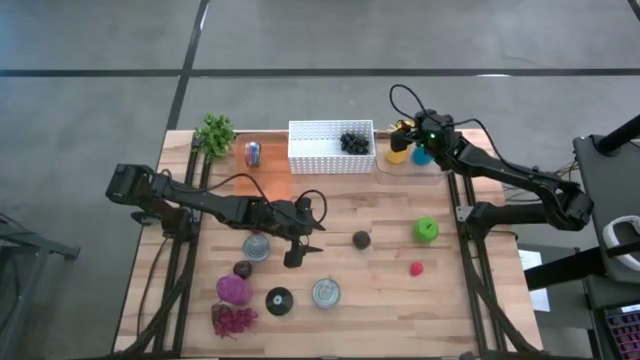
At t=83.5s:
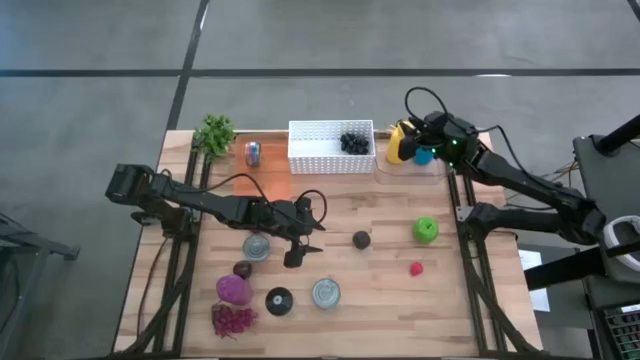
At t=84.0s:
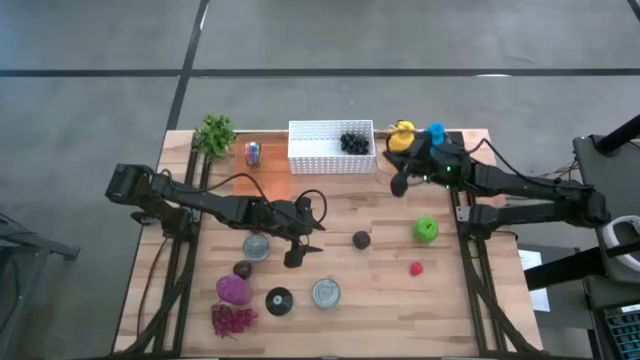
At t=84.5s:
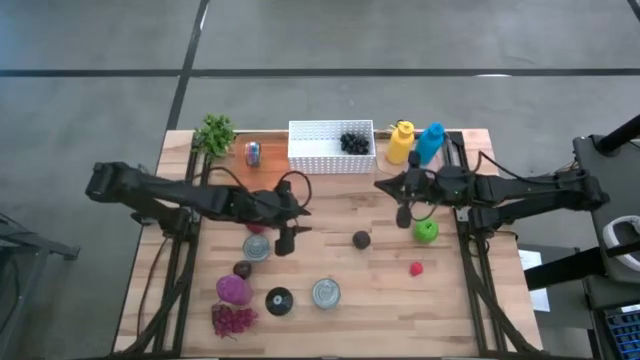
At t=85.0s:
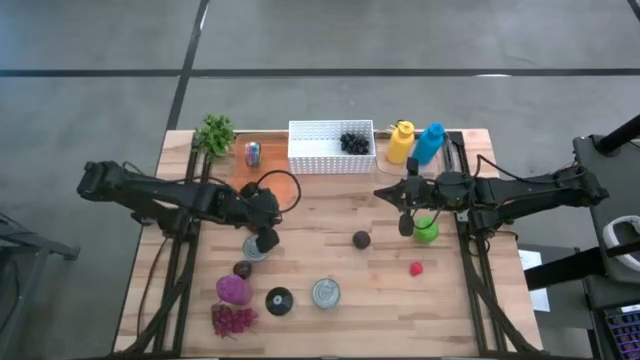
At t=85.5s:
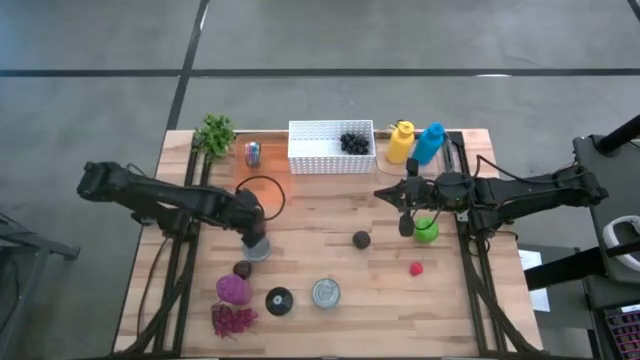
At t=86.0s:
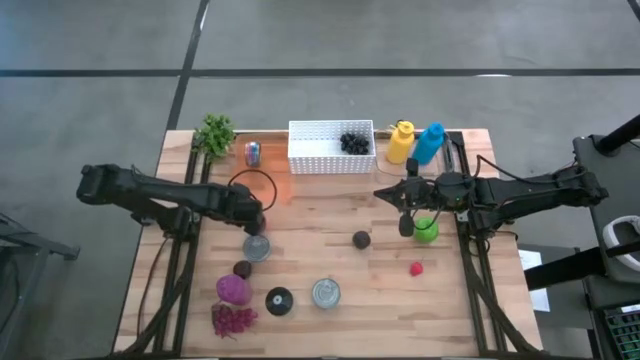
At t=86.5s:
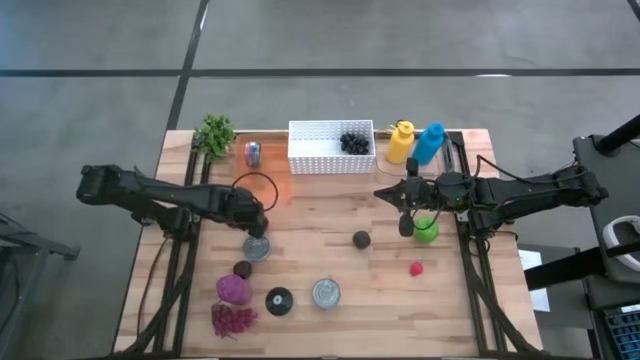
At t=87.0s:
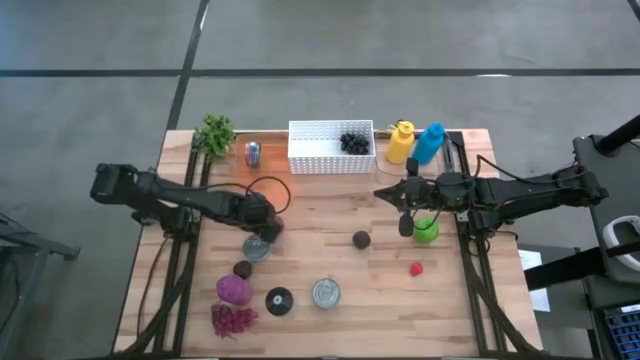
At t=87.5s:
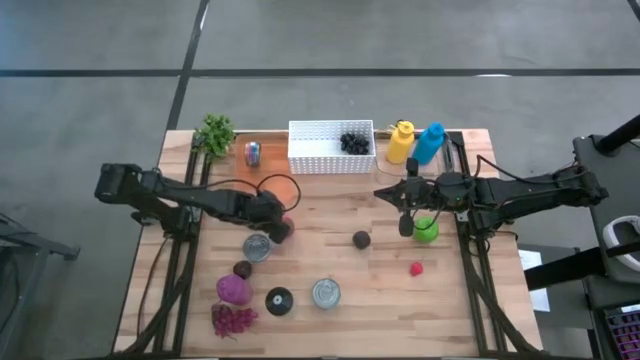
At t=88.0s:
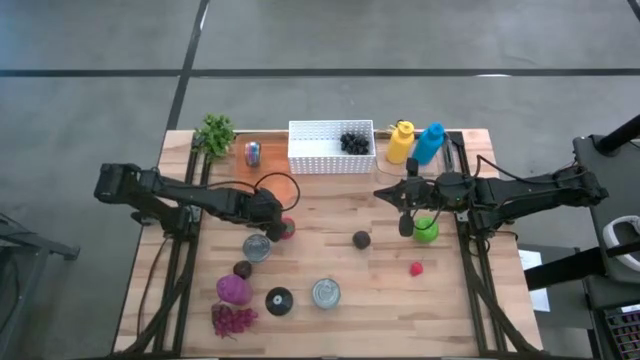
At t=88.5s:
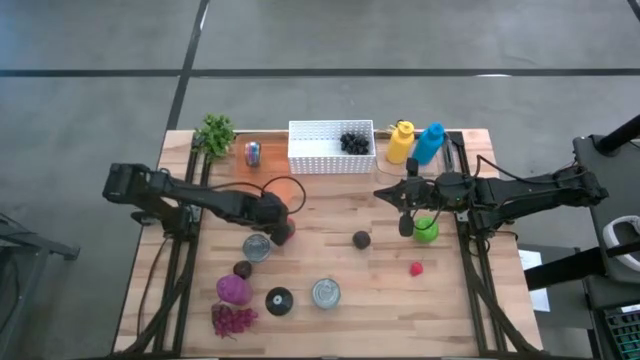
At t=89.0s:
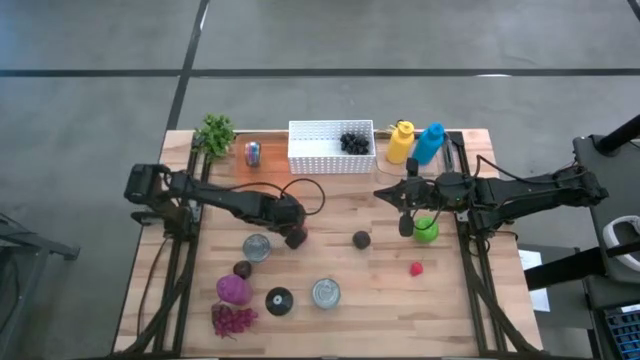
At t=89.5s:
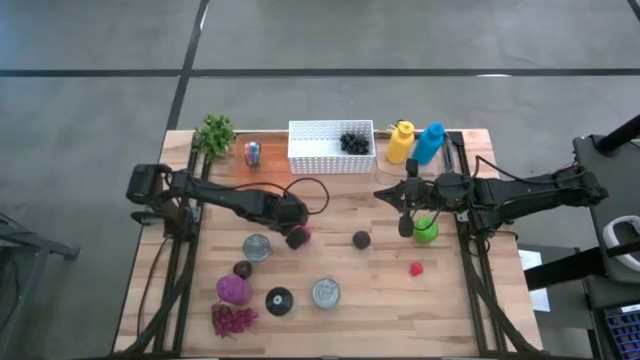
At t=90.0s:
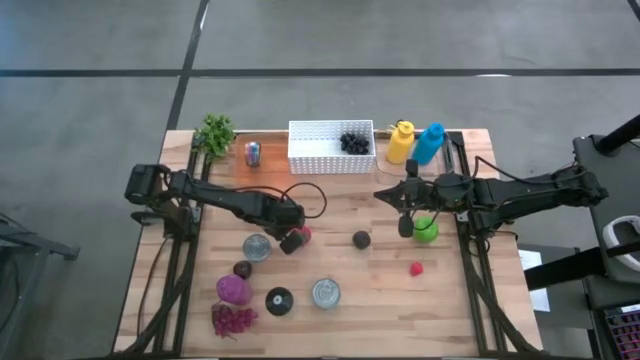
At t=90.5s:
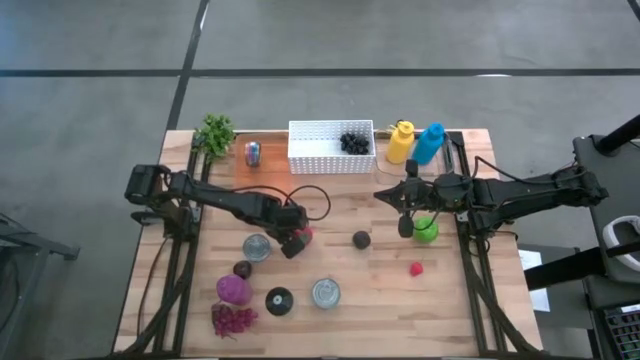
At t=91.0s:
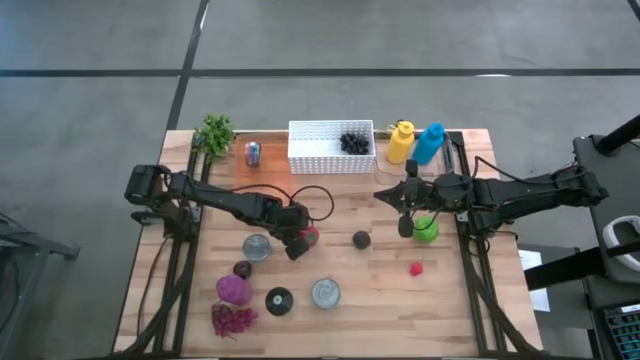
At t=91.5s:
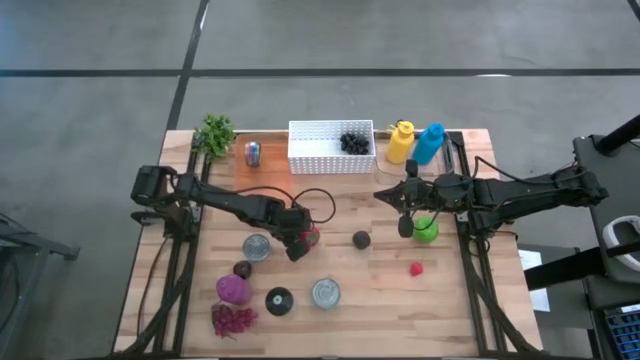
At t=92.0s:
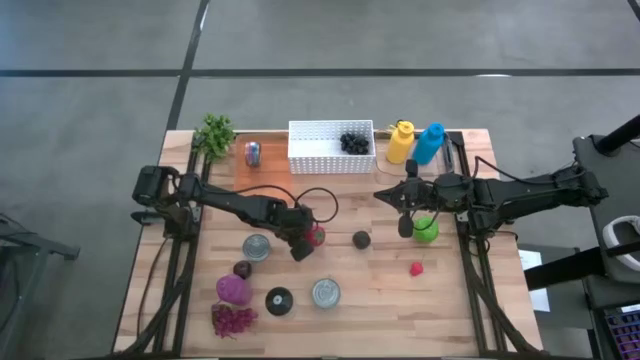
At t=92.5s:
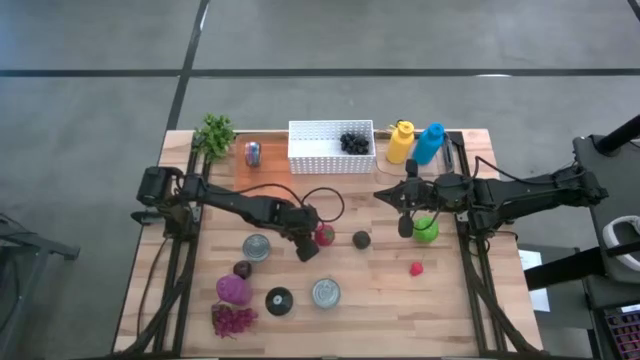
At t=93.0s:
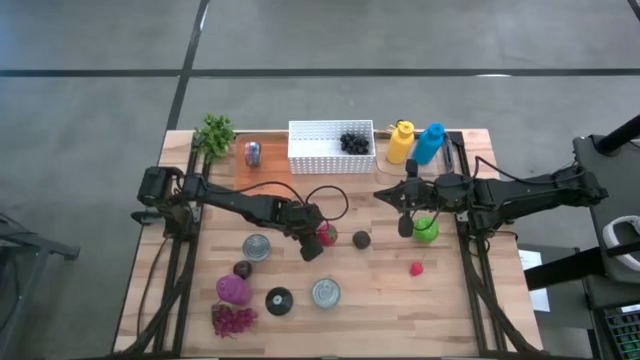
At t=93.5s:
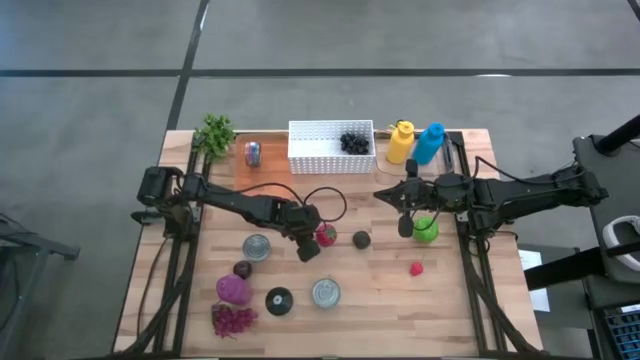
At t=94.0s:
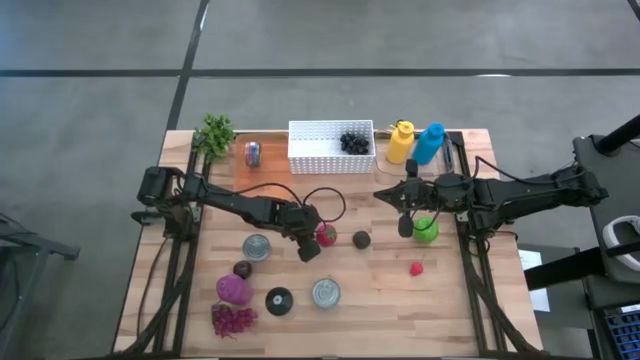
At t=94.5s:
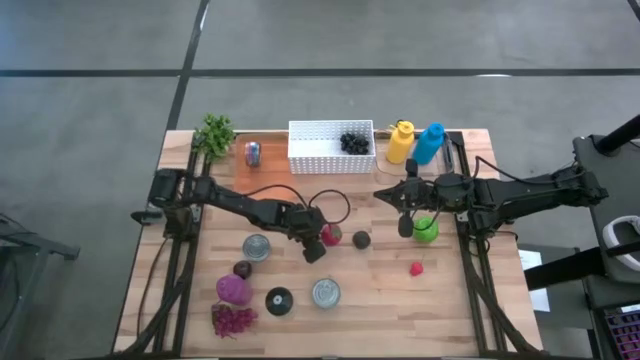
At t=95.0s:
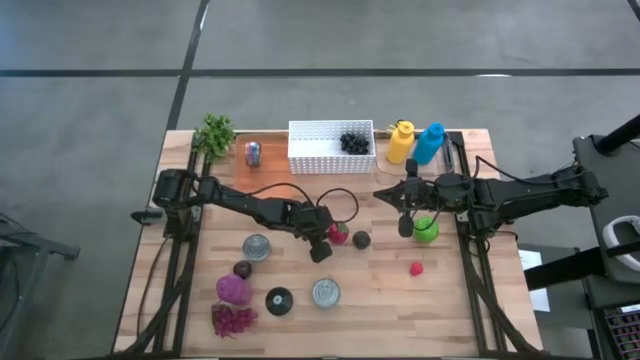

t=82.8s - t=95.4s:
Task: Pick & Place Food Item
Put the tomato into the white bin

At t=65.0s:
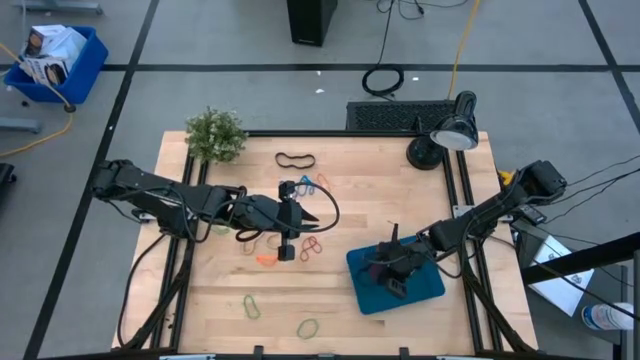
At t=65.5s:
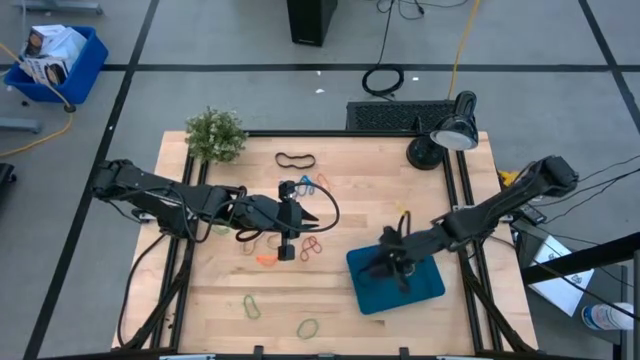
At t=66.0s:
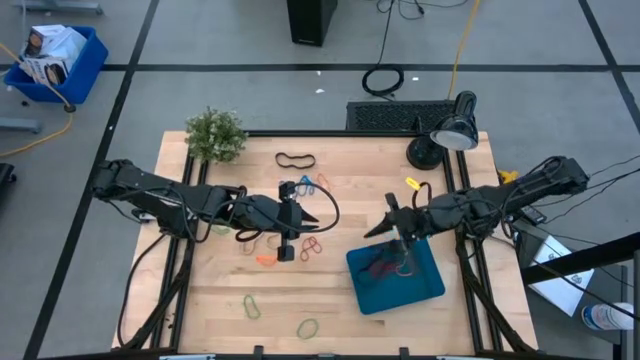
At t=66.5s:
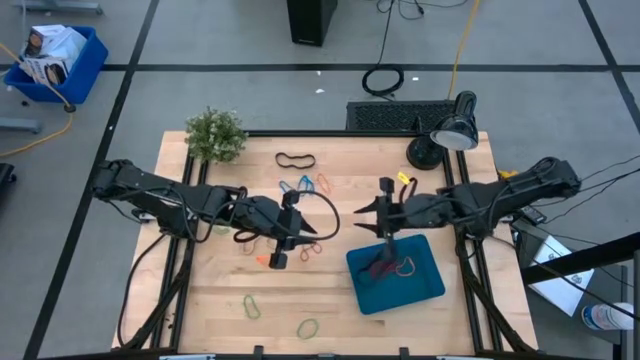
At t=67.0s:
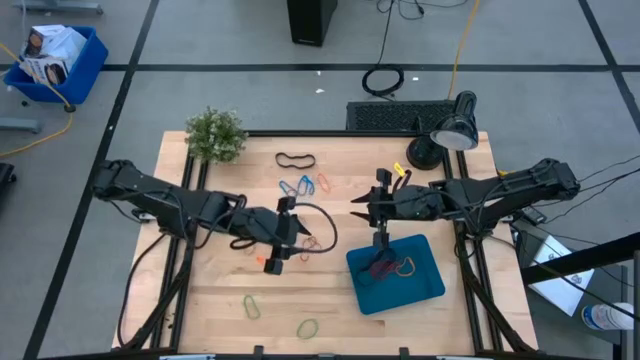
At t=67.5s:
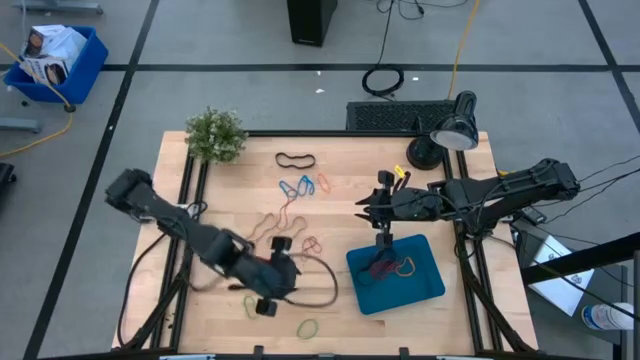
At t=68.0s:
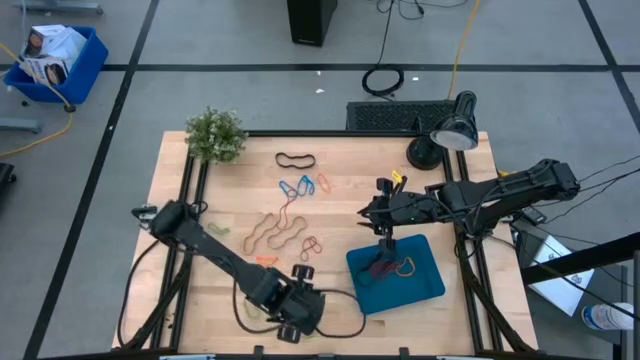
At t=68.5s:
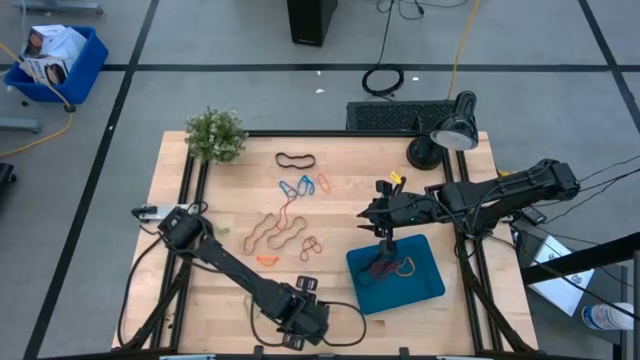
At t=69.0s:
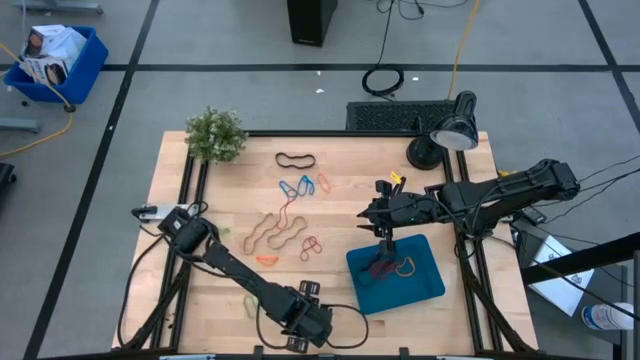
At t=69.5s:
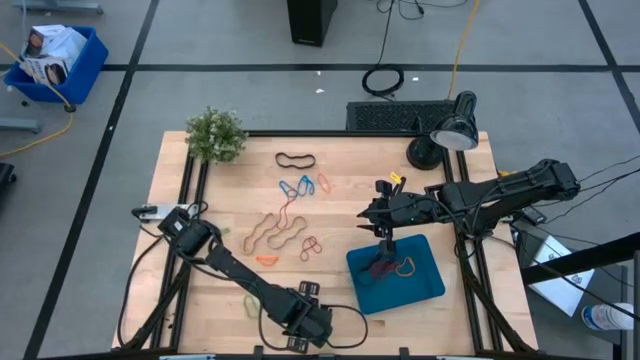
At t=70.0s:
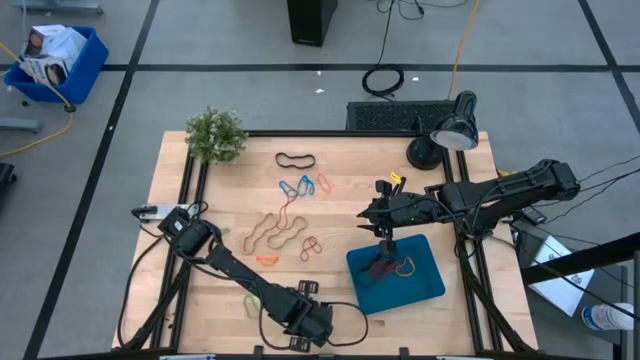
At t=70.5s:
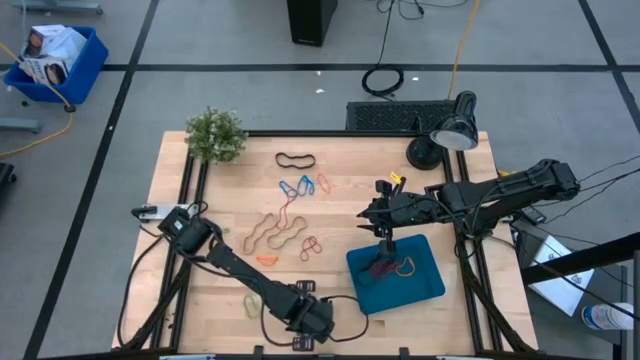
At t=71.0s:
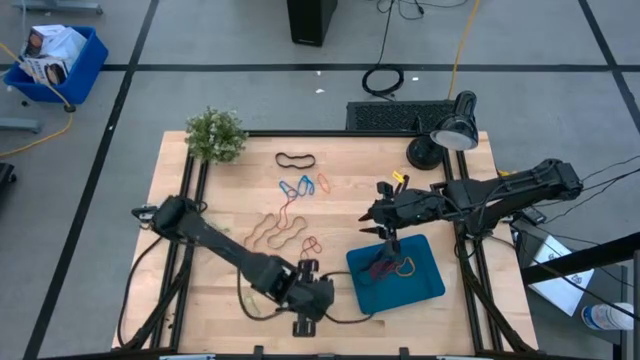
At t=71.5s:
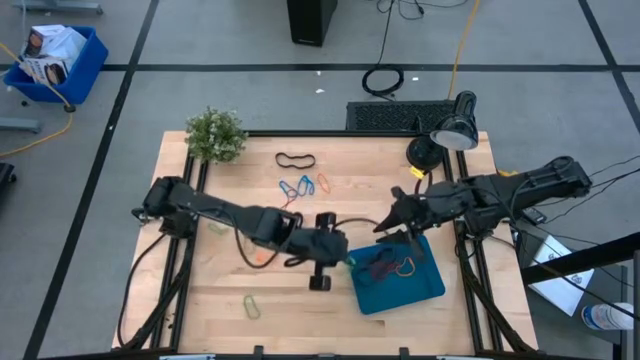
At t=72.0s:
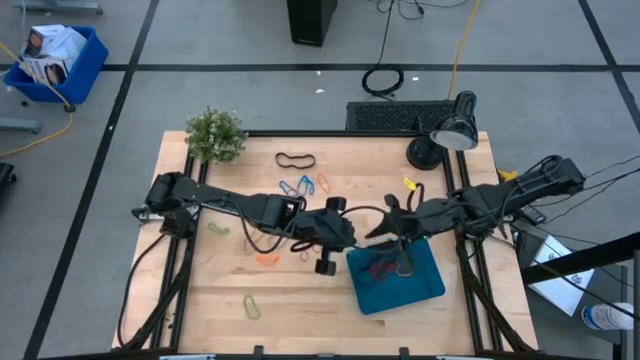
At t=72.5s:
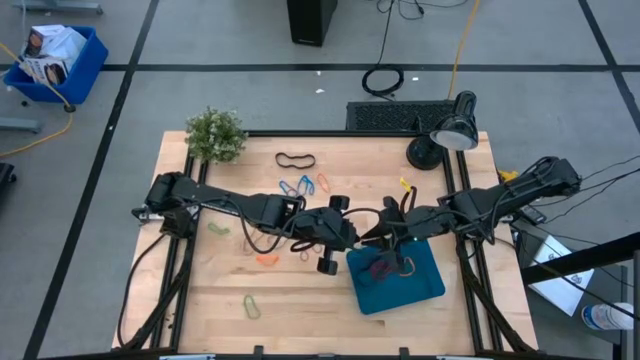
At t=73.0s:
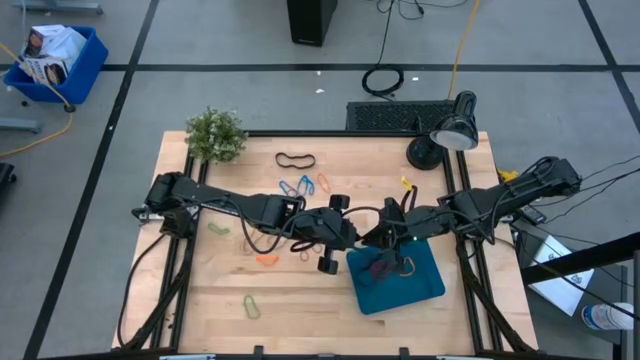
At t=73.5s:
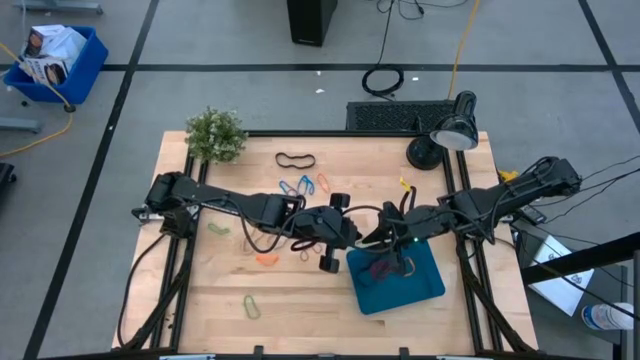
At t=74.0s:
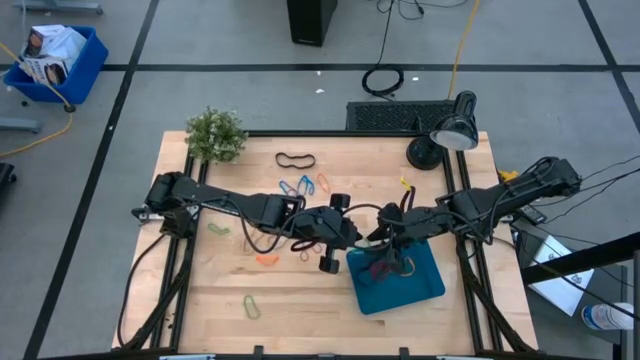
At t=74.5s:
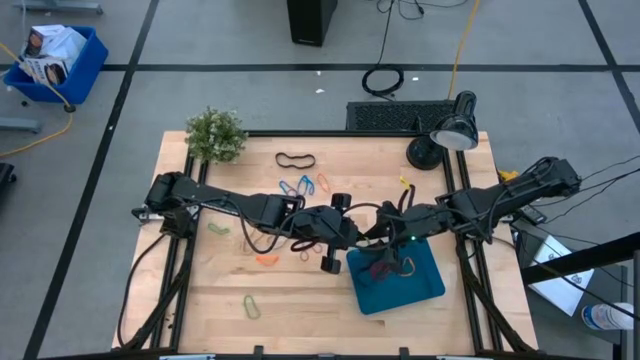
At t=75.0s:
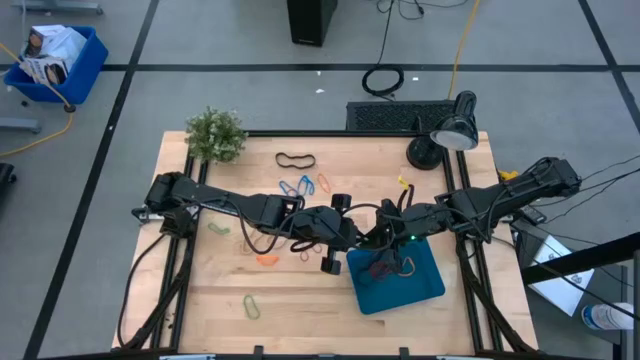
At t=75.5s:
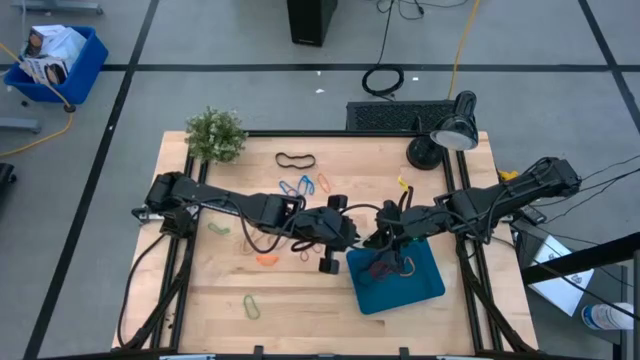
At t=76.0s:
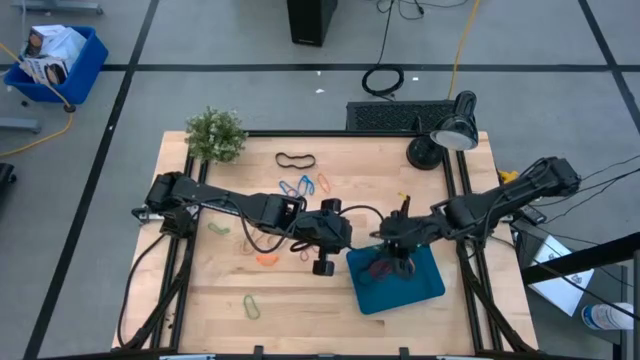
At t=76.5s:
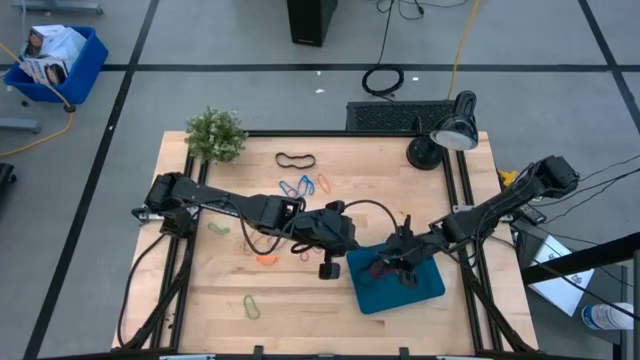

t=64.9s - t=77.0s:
Task: Pick and place rubber bands into bin
Put the green rubber band into the blue bin
